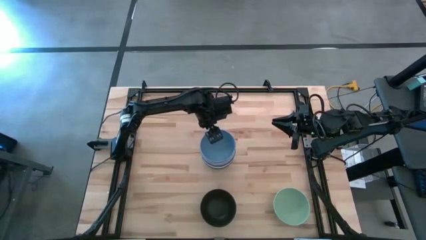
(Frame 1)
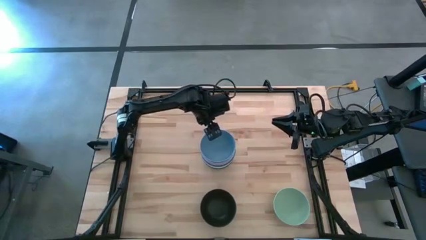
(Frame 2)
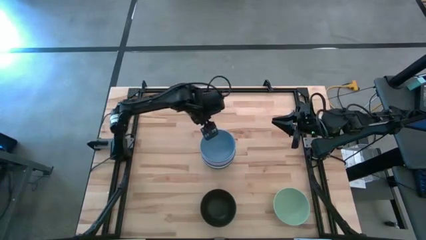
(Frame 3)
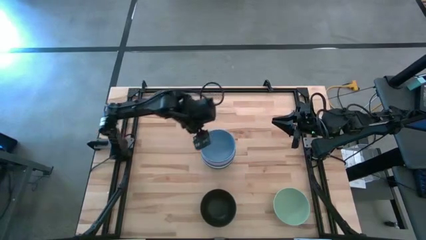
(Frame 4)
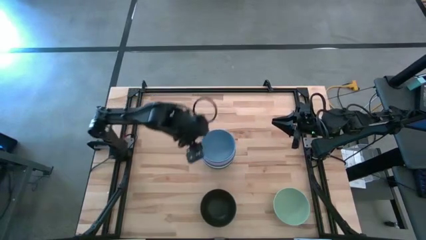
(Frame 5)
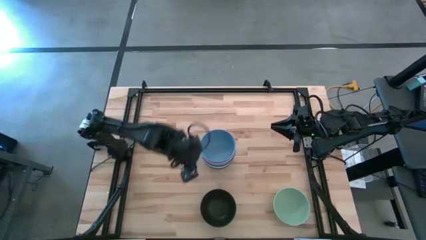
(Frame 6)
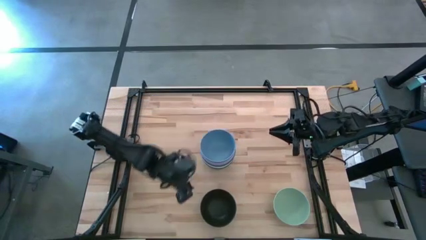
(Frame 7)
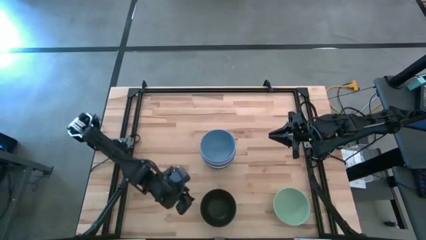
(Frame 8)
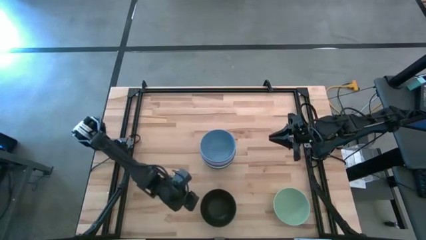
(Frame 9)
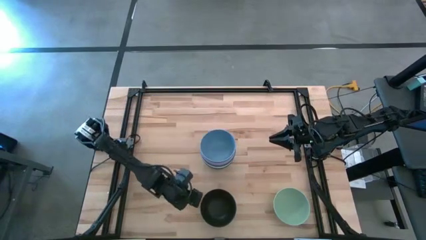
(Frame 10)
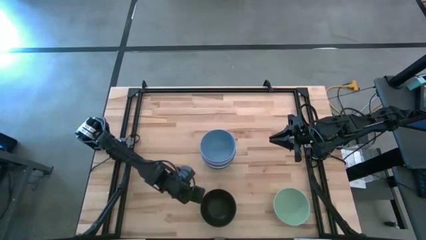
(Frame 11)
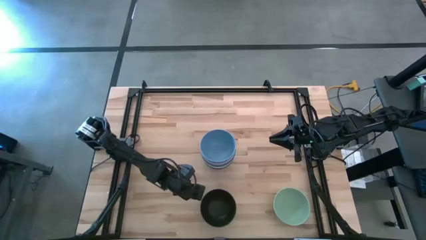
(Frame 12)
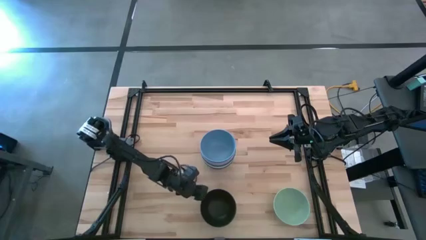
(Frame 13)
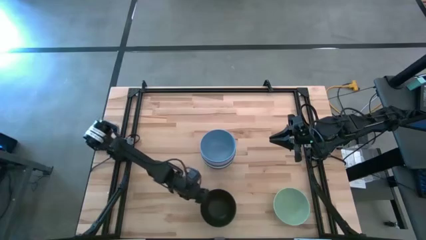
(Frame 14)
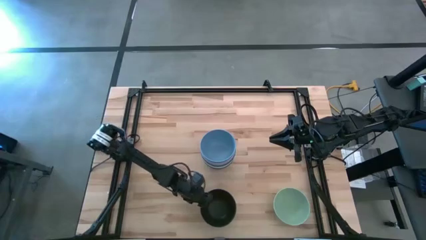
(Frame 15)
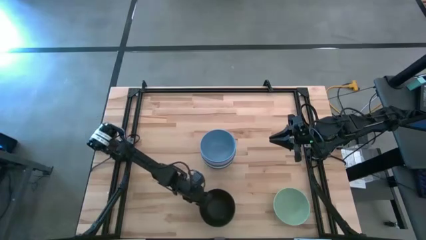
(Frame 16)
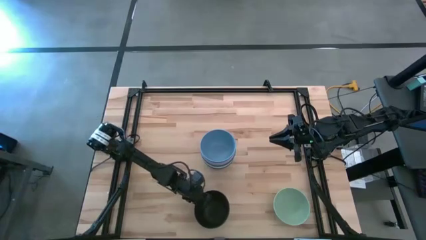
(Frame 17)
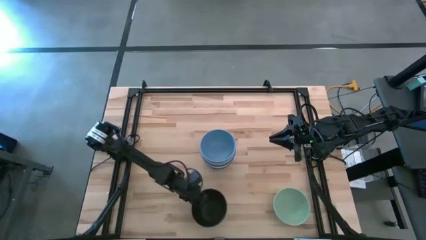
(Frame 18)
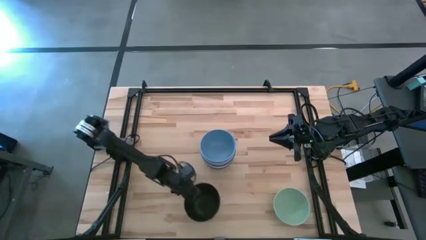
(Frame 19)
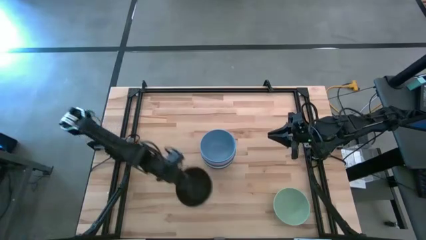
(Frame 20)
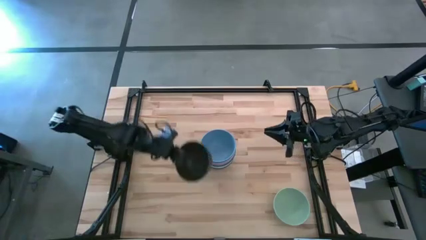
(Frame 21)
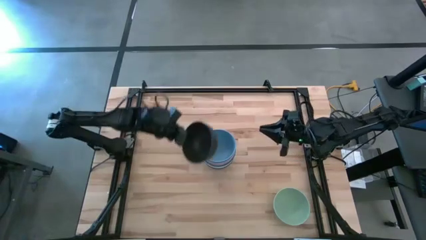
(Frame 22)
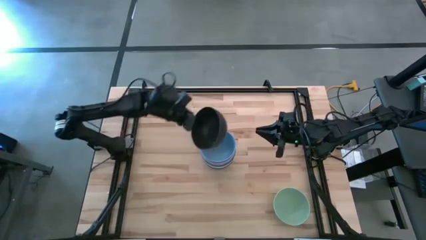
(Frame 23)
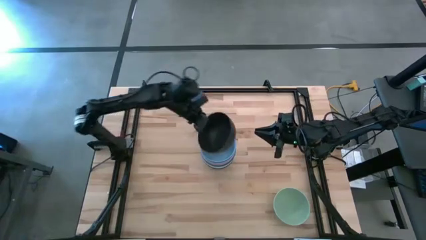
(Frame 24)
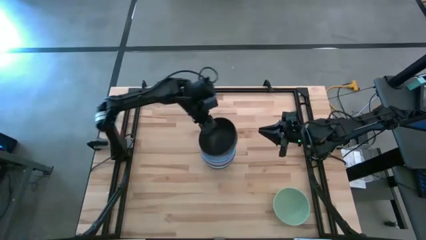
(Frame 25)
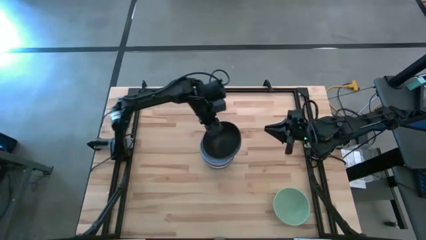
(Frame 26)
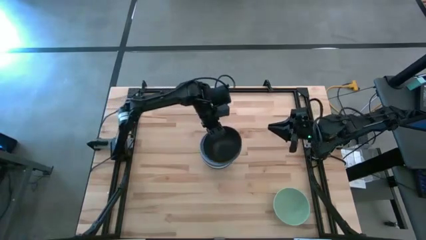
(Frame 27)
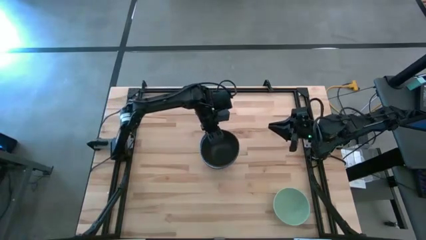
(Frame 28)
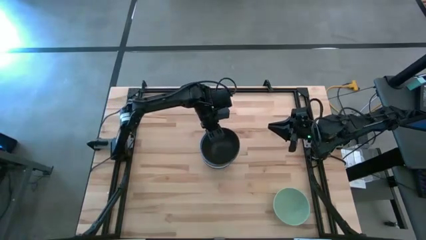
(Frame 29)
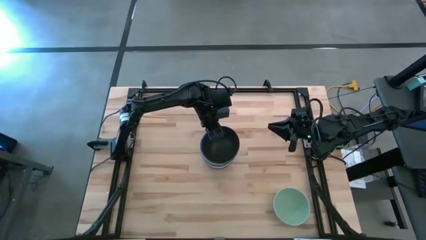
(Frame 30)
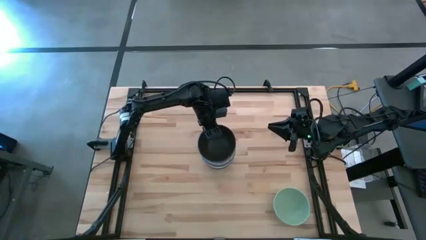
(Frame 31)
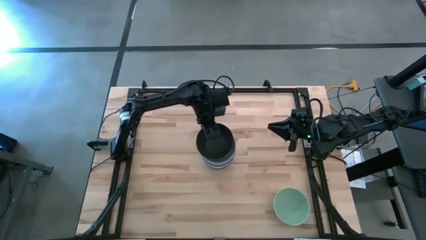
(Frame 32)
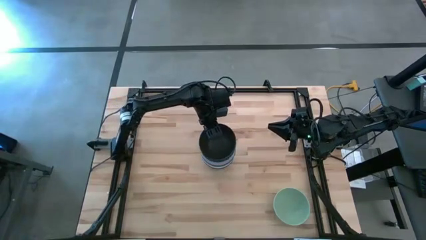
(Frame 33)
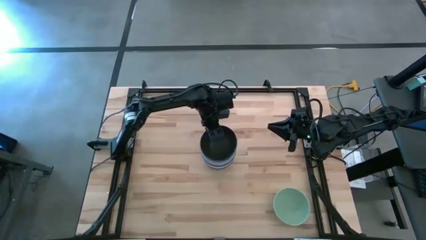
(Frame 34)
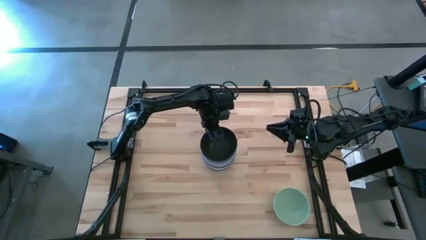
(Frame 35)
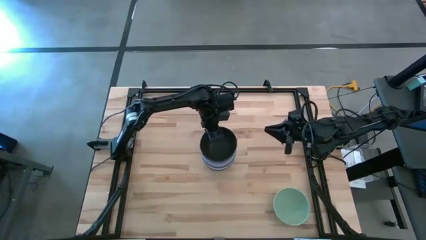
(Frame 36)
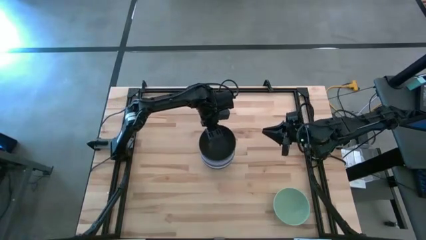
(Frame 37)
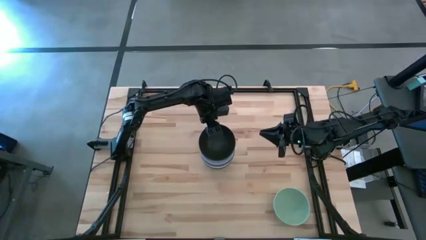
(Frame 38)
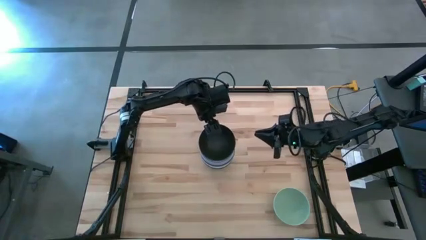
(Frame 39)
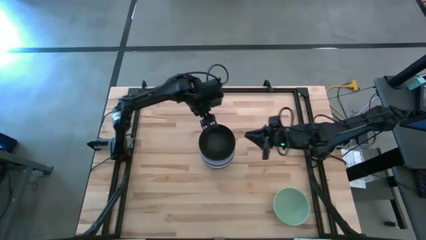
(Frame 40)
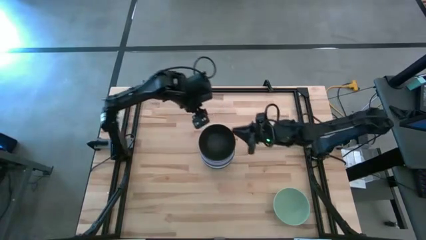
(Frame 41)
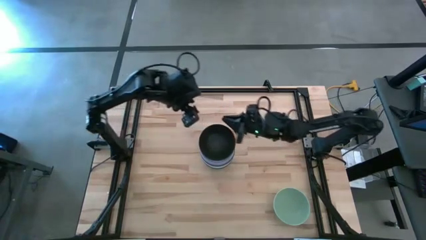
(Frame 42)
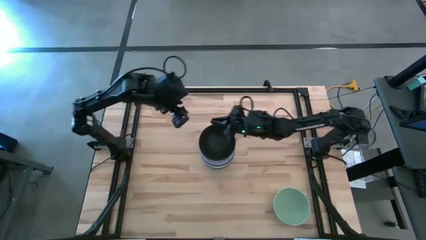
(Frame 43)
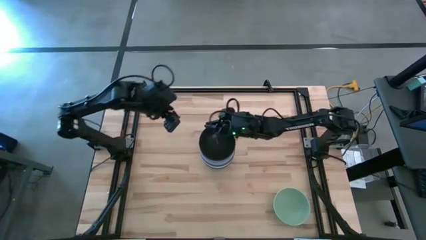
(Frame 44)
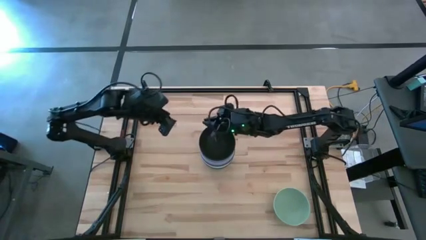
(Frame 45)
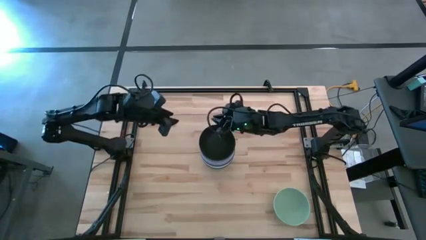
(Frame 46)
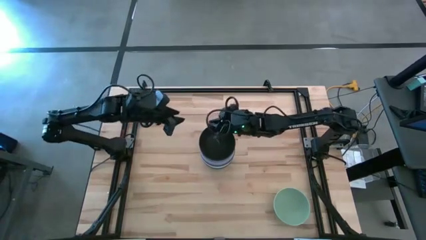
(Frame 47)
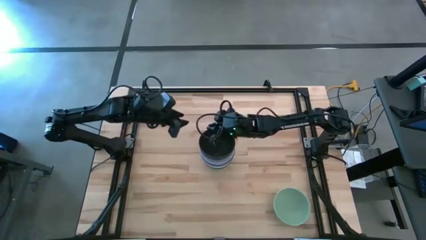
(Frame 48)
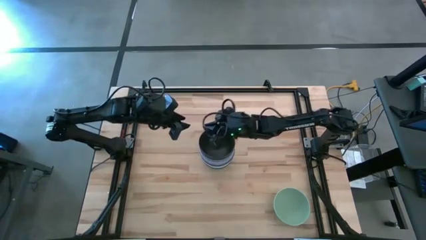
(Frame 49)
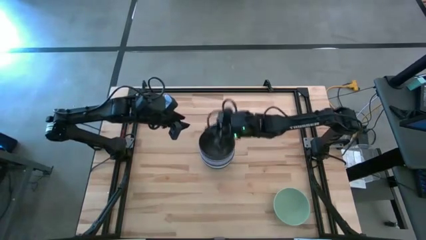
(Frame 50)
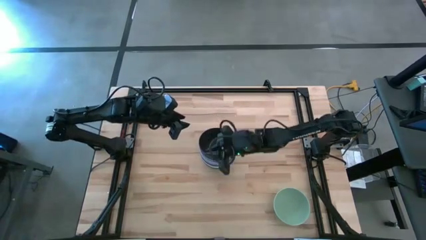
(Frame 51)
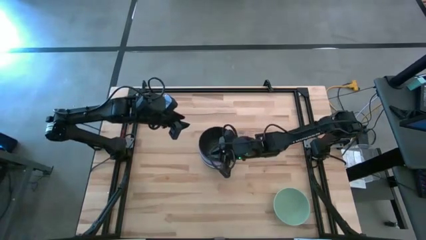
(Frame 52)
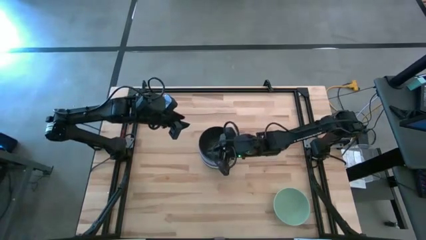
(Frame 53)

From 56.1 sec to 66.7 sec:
Task: Nest bowls inside each other
Stack the black bowl on top of the light blue bowl

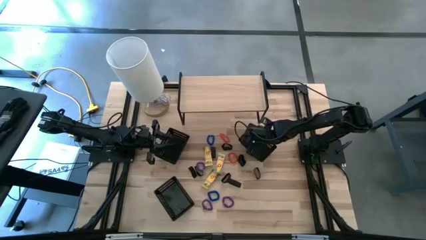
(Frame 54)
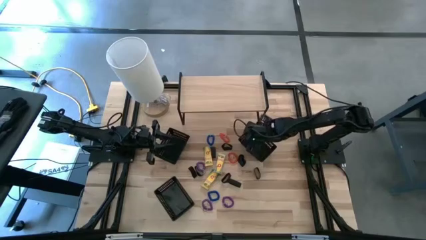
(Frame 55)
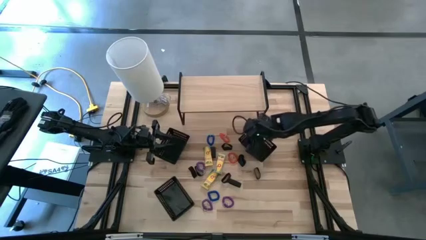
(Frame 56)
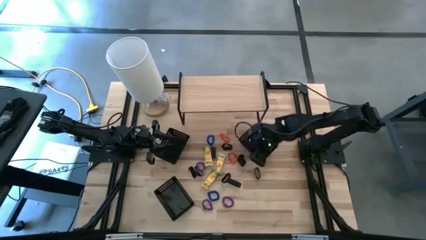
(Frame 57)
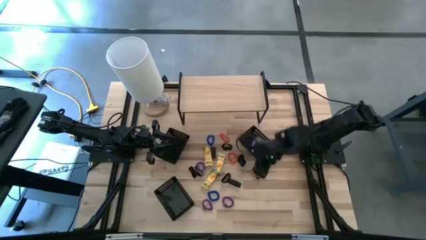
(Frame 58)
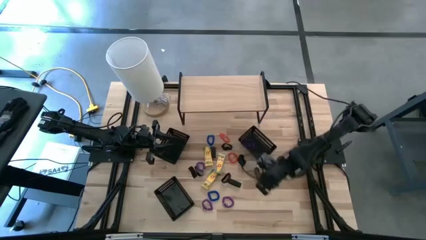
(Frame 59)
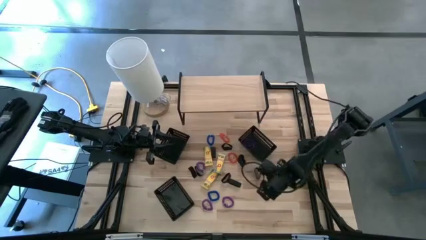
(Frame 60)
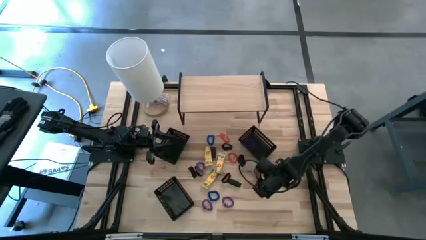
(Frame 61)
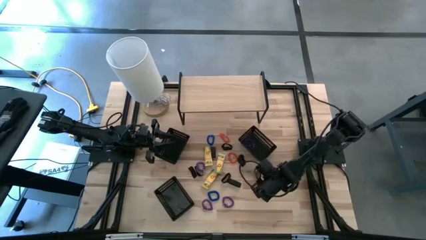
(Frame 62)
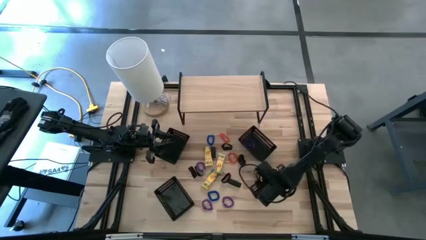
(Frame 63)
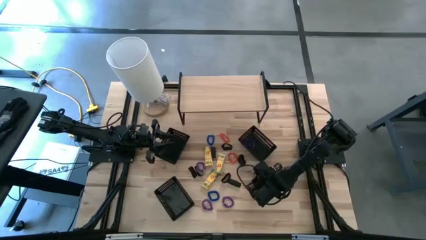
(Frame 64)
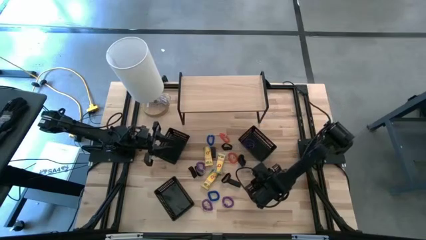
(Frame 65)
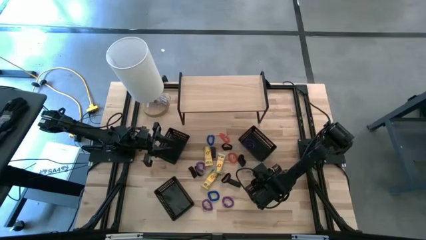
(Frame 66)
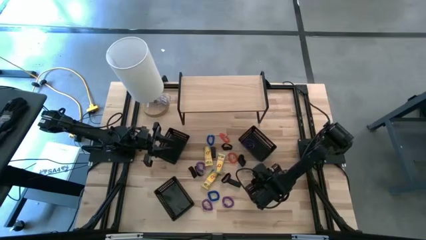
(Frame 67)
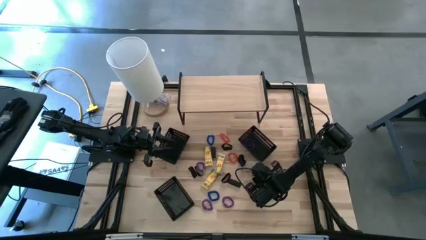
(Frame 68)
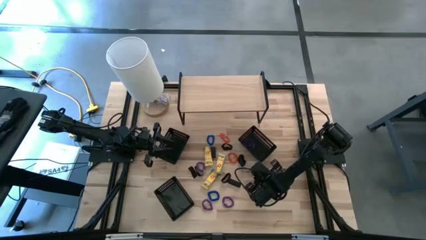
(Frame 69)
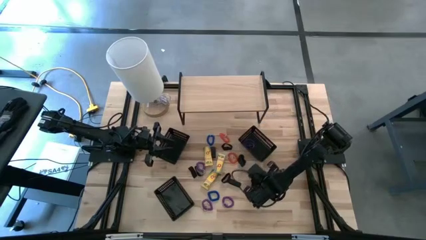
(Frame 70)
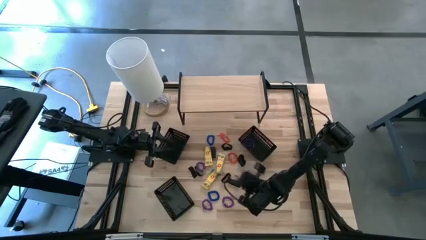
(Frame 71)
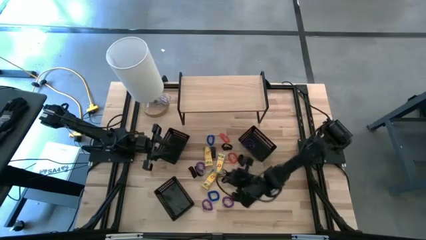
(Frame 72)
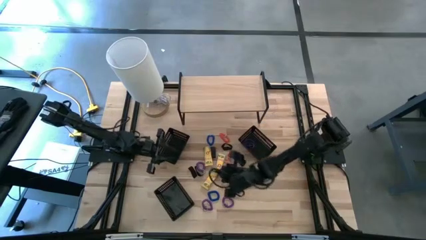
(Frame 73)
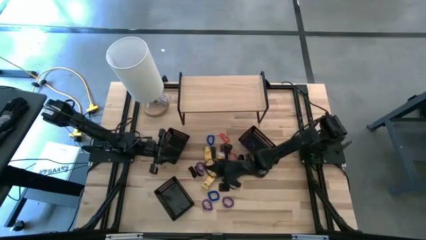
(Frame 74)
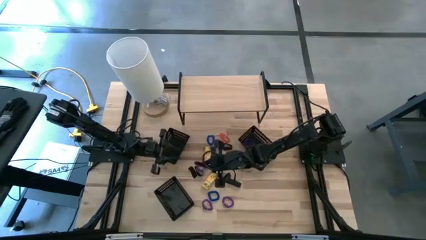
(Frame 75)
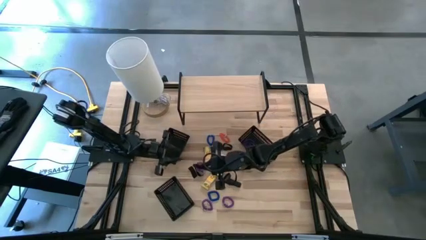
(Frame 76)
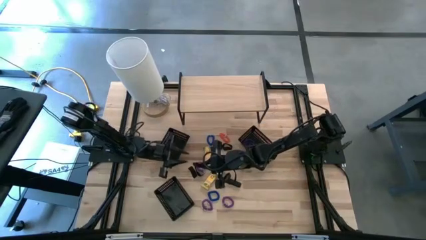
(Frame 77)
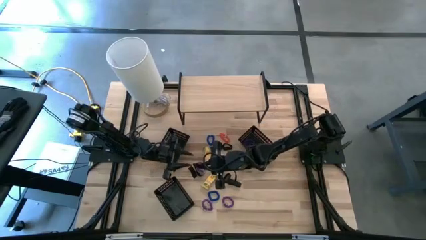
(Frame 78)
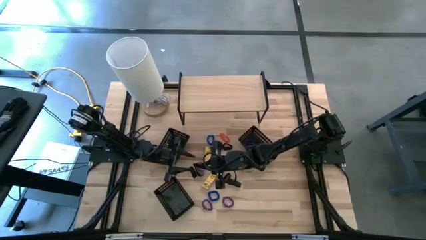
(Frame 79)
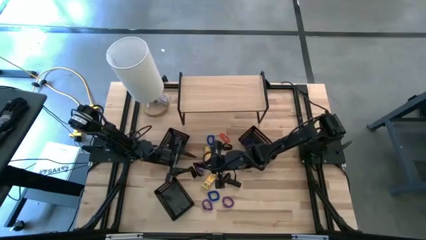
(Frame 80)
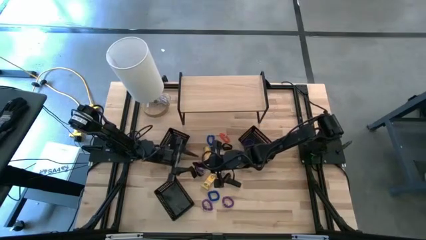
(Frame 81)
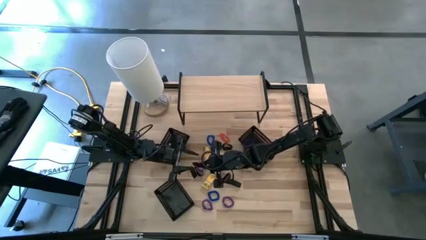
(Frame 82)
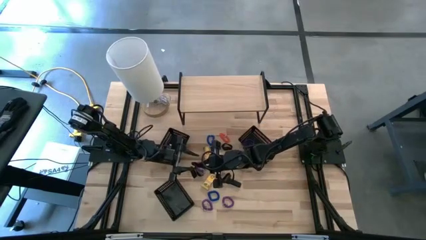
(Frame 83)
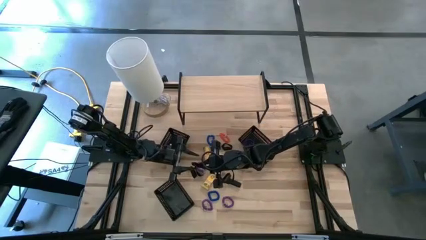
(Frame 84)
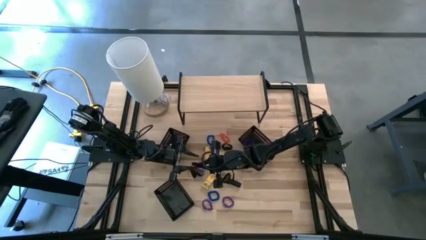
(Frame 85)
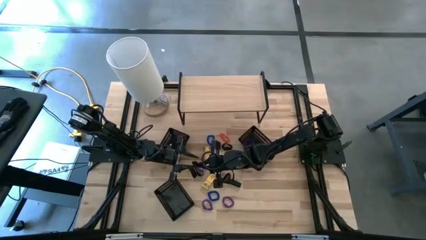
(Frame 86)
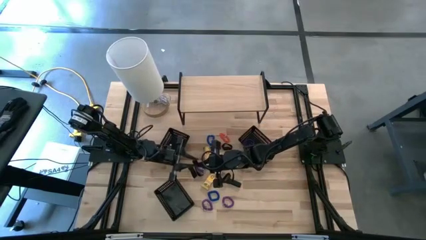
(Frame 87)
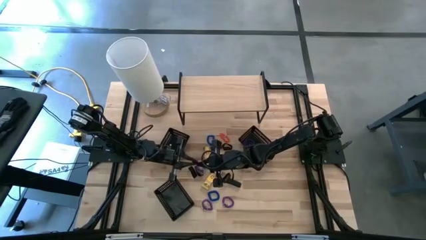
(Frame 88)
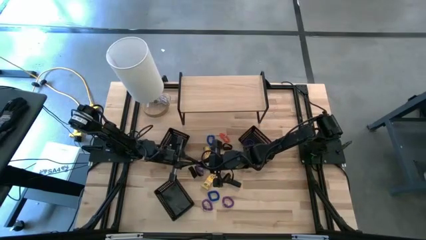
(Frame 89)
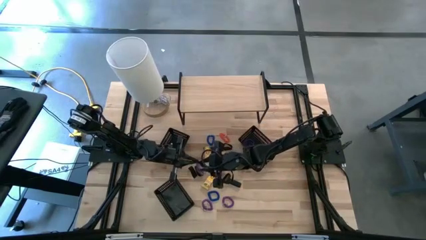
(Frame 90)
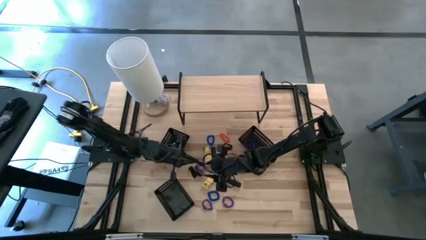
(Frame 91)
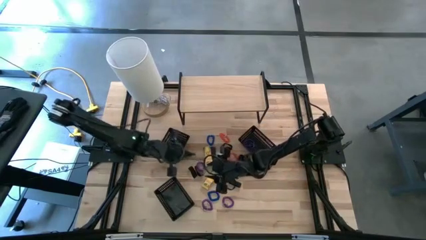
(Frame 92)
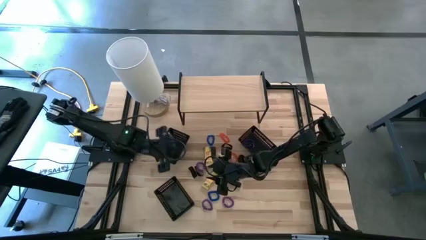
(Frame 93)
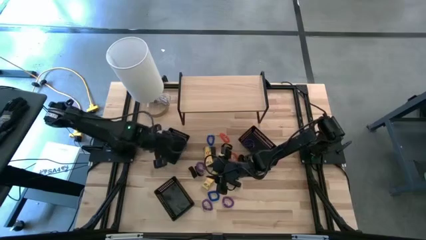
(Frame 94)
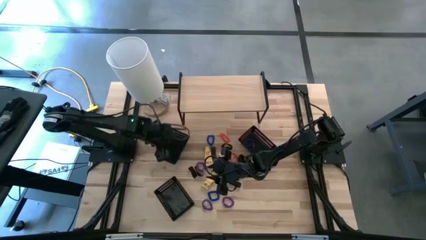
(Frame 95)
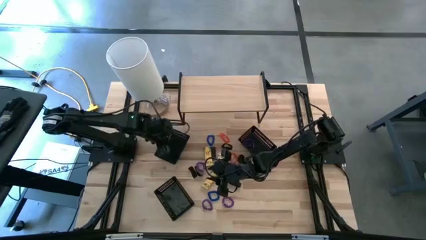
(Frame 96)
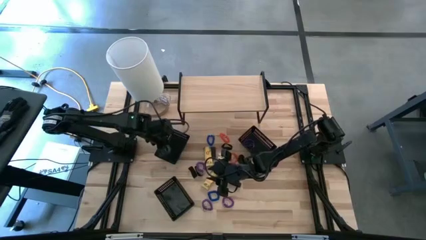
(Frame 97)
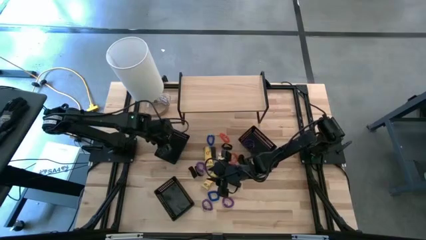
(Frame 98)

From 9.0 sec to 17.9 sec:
Task: Pick & Place Office Desk Supplies
Put the black rubber band into the top left black bin
